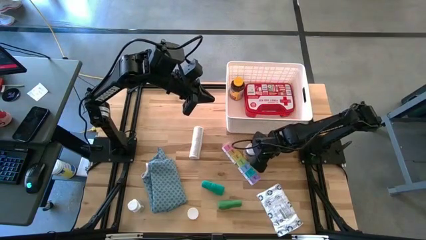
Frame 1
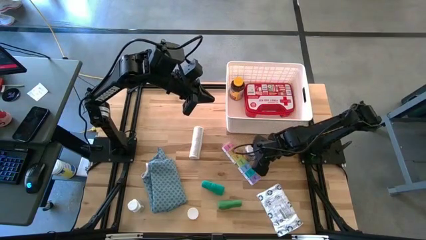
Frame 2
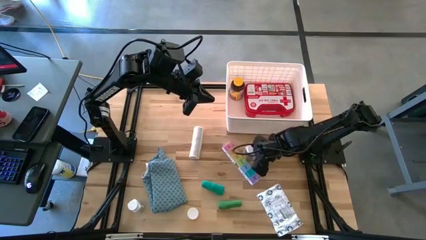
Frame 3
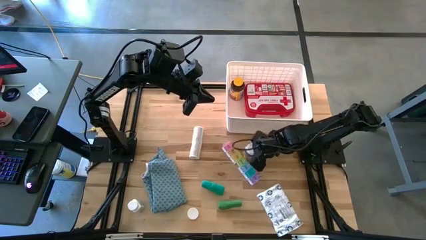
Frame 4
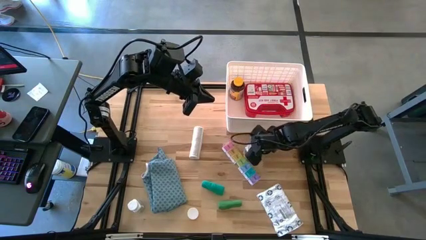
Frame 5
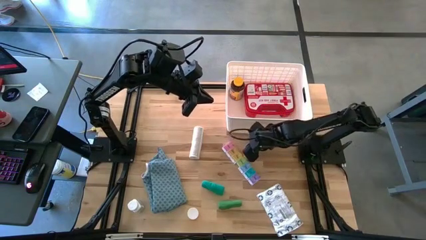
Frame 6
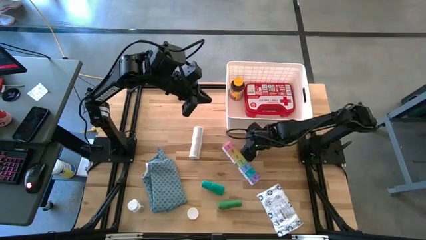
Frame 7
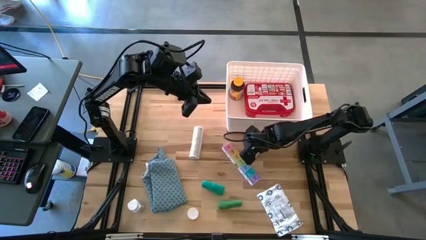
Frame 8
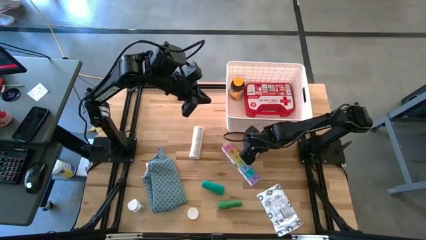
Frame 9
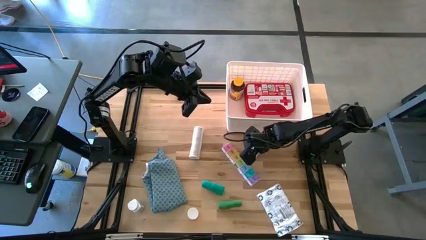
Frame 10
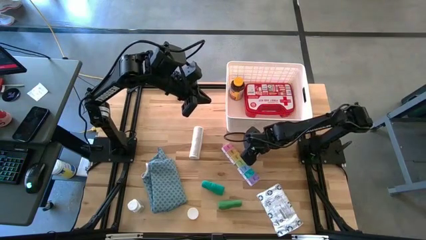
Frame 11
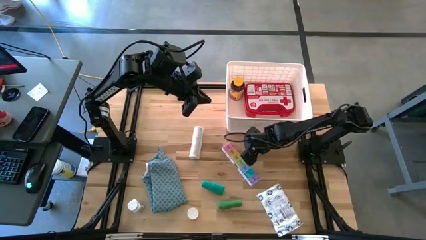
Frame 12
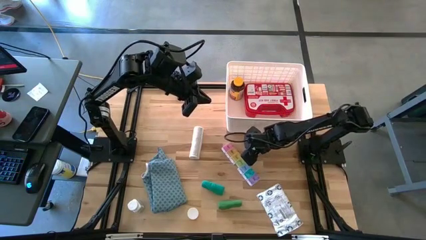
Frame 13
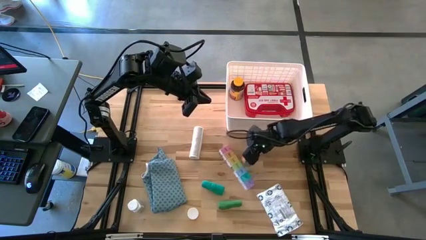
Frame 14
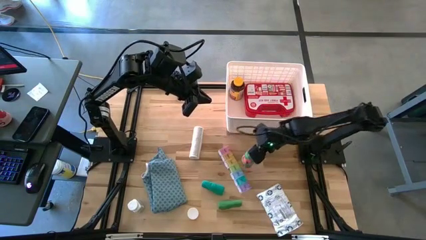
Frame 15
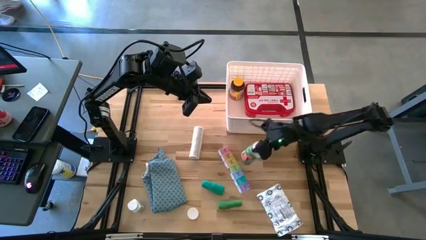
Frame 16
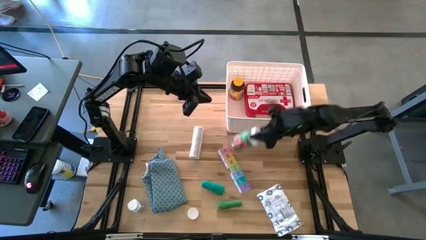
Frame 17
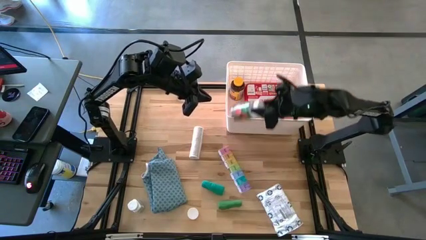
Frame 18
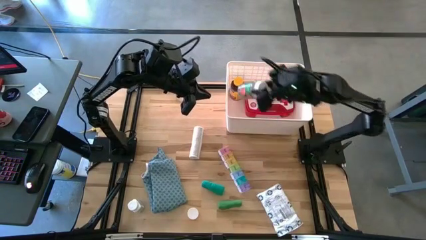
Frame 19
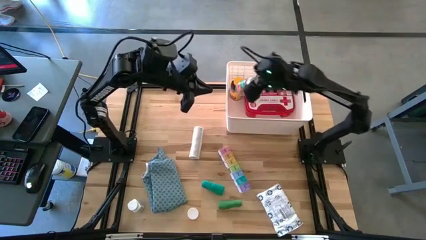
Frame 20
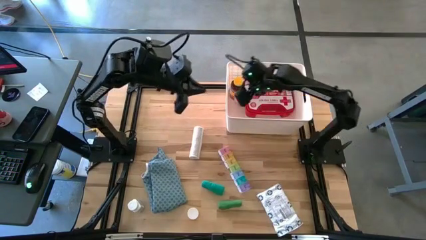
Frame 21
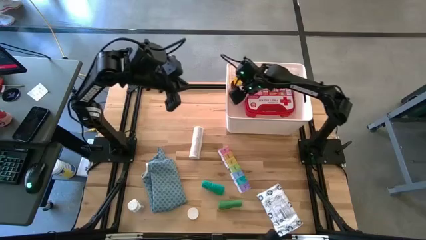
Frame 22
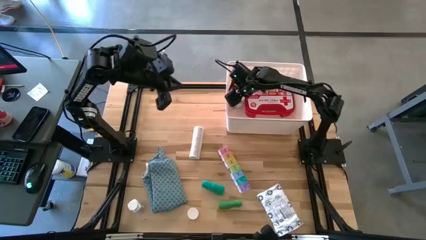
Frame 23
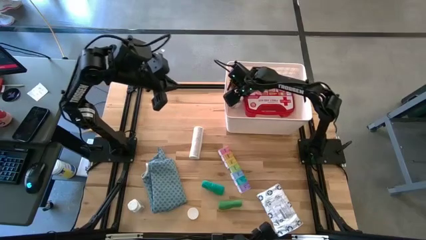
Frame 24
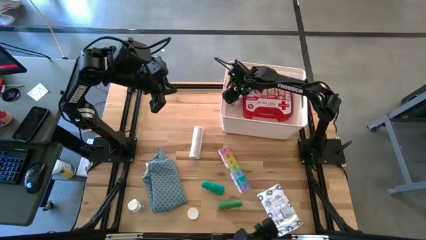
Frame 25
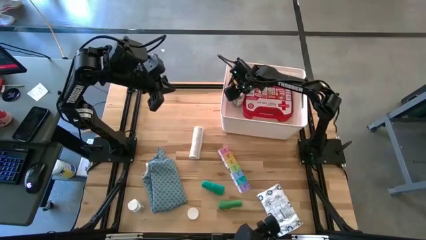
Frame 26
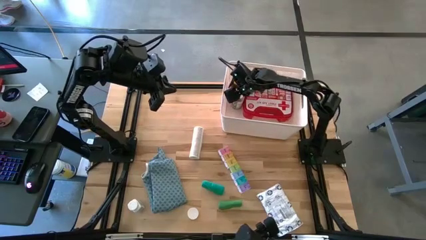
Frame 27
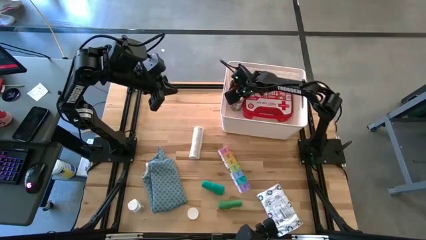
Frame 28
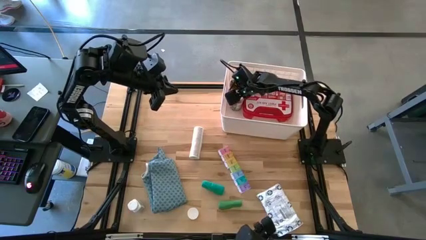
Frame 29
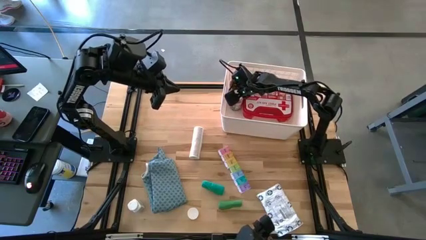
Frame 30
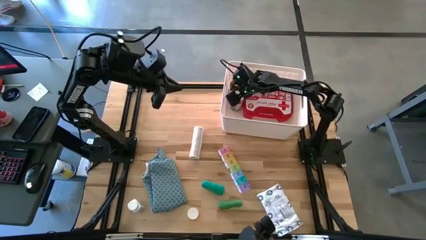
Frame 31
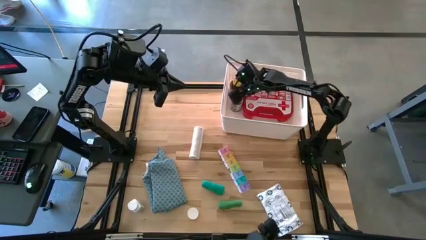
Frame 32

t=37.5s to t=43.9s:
Task: Pick & place medical supplies in basket/bin
Put the white and green pill bottle into the white bin

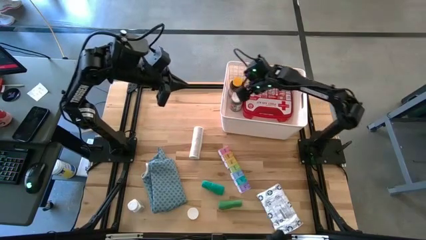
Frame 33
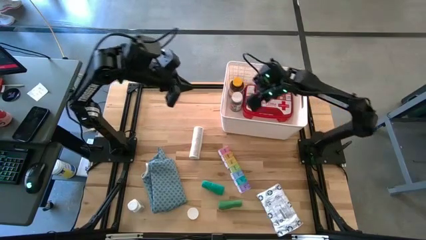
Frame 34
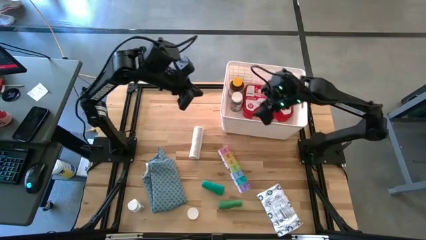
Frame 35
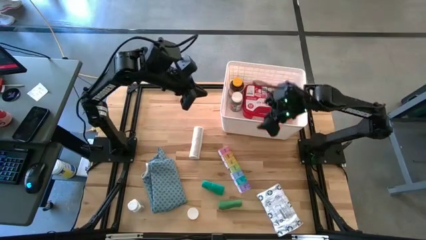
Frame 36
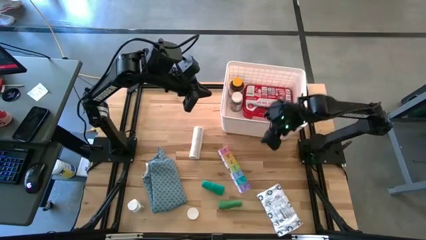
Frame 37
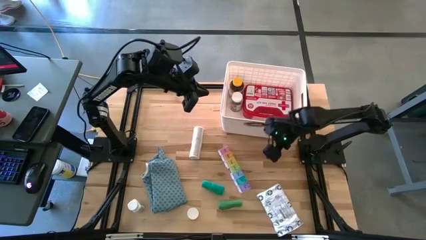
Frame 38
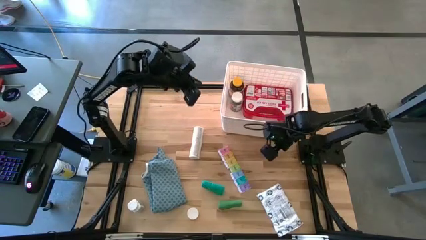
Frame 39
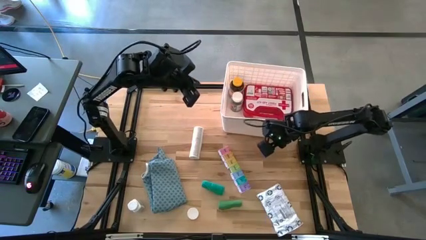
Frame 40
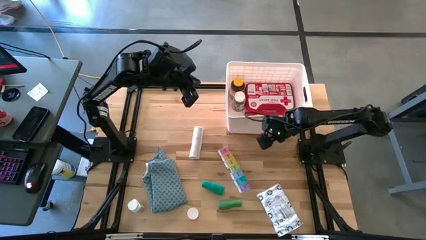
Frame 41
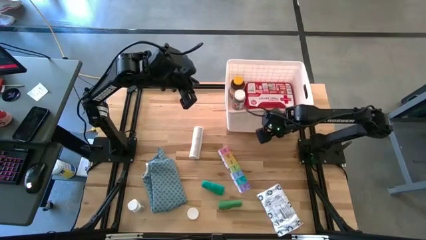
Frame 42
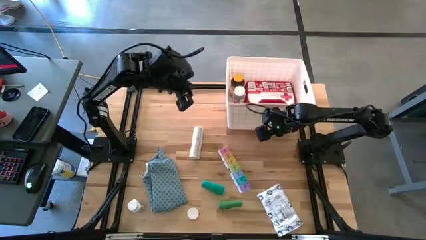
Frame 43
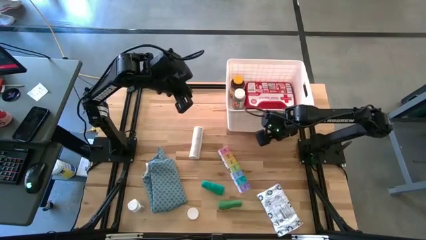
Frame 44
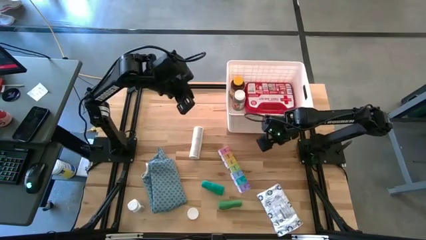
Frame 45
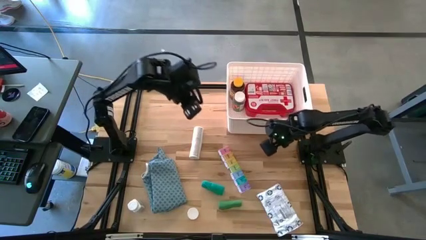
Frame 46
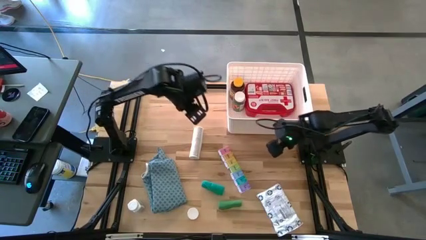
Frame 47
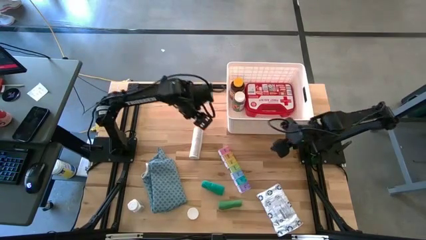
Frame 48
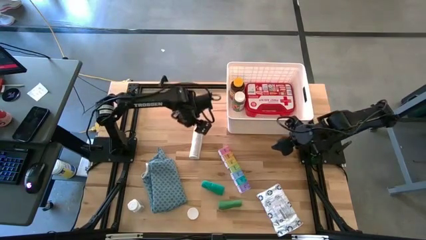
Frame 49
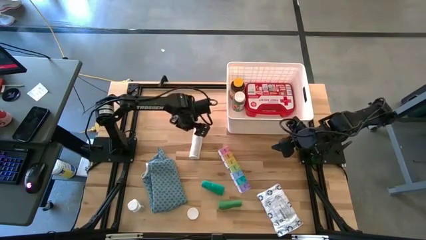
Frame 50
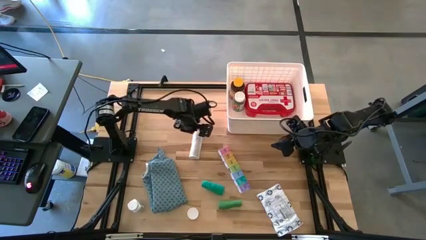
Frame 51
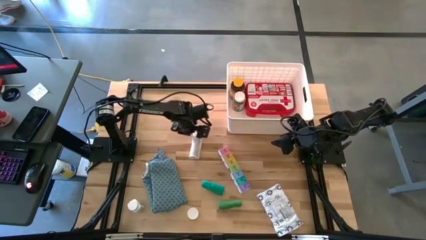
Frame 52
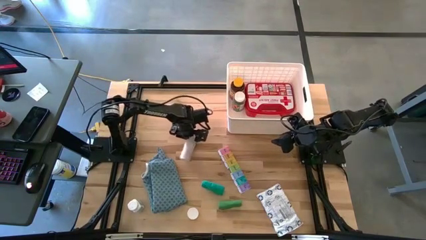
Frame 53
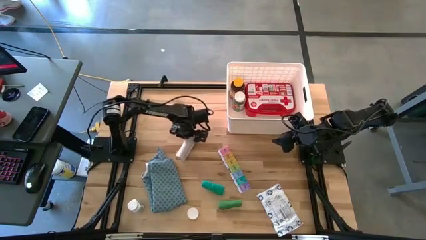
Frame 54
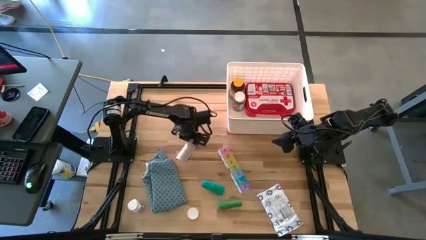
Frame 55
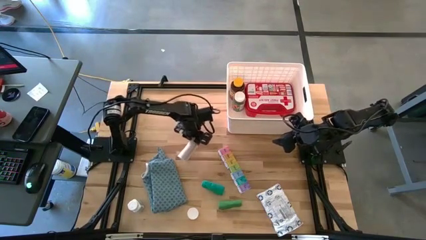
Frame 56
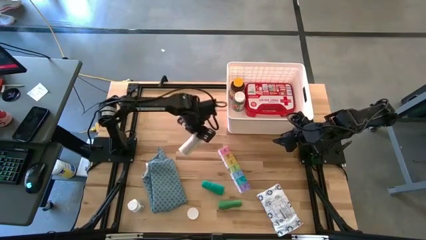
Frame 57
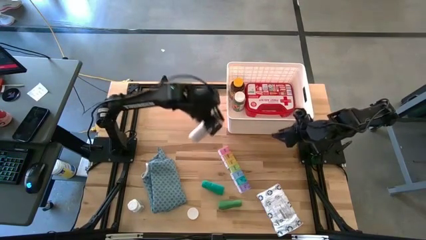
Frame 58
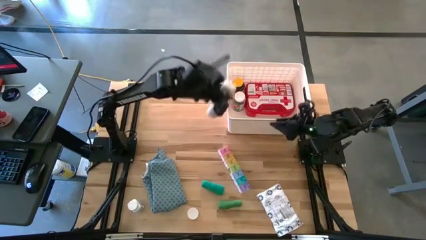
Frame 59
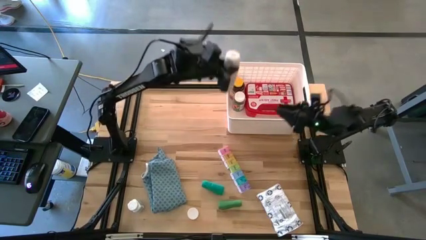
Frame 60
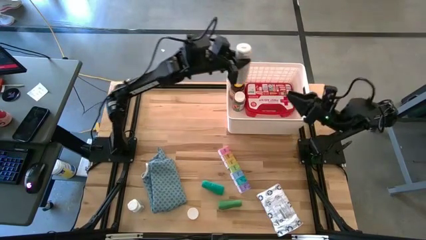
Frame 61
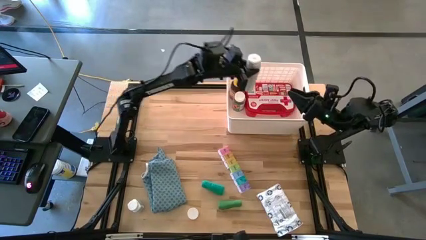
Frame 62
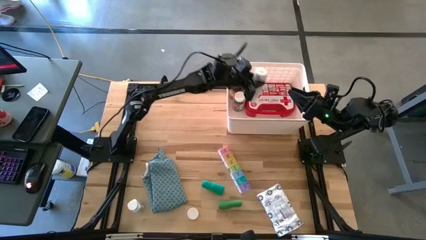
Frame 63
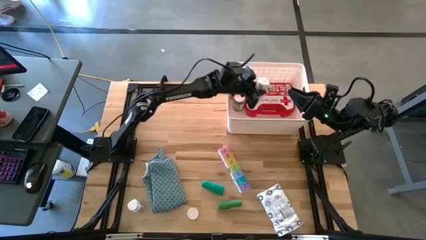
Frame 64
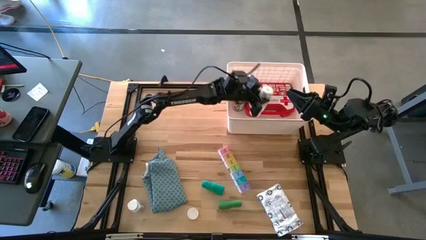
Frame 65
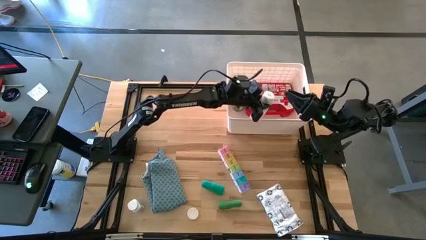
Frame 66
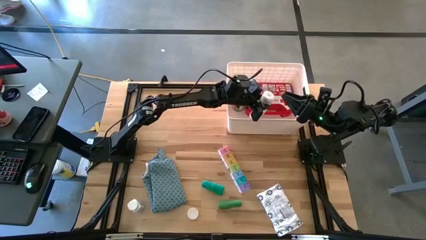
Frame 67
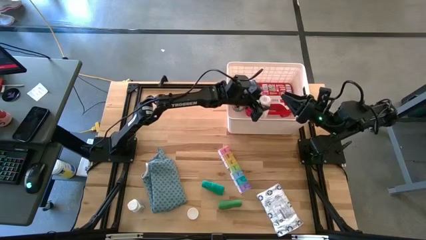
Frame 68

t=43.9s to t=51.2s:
Put the white bandage into the white bin
